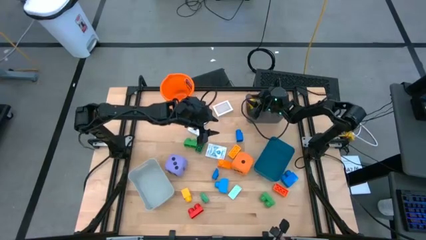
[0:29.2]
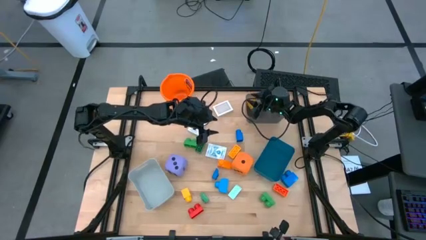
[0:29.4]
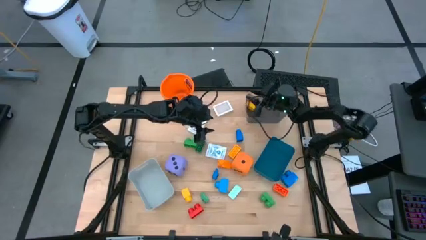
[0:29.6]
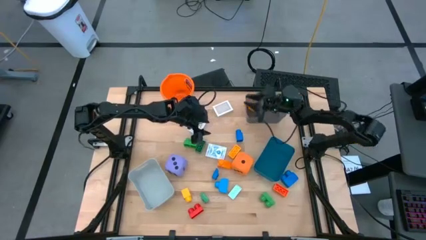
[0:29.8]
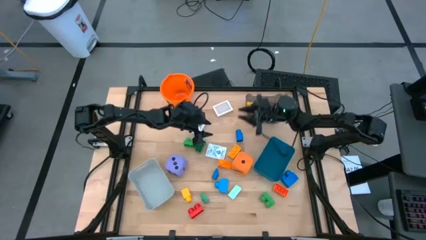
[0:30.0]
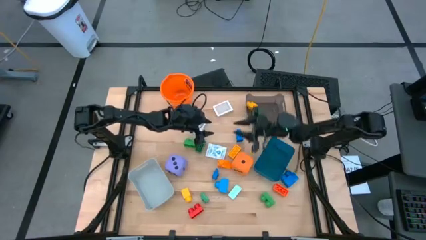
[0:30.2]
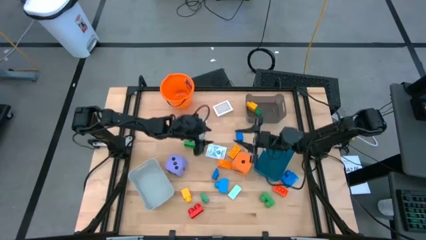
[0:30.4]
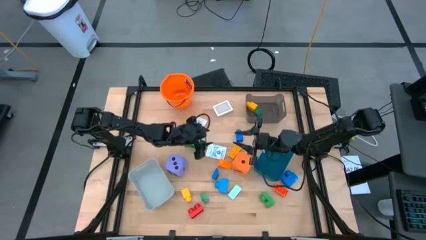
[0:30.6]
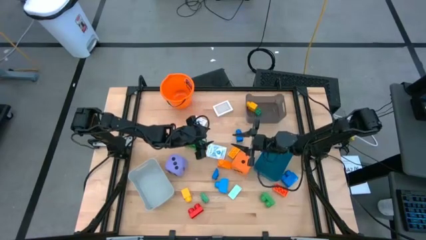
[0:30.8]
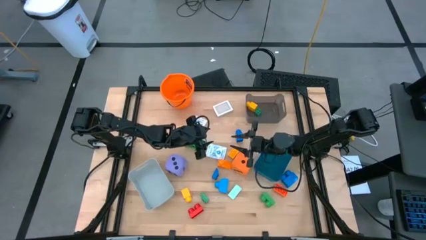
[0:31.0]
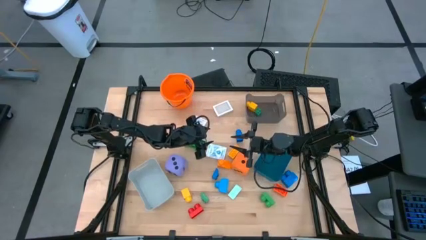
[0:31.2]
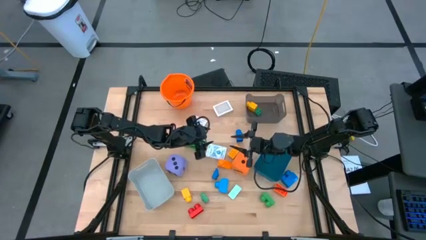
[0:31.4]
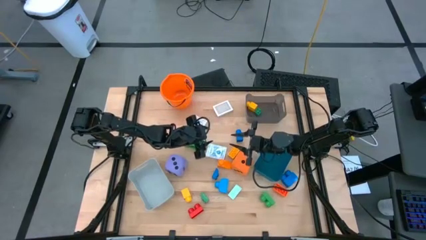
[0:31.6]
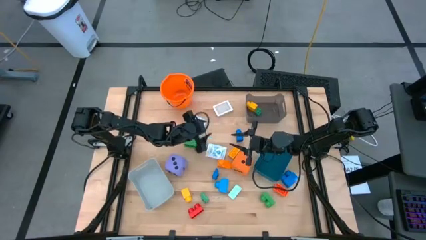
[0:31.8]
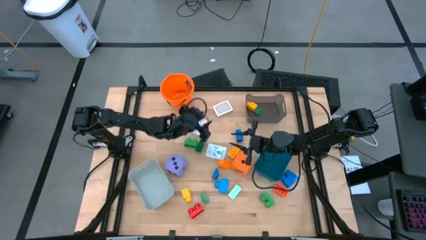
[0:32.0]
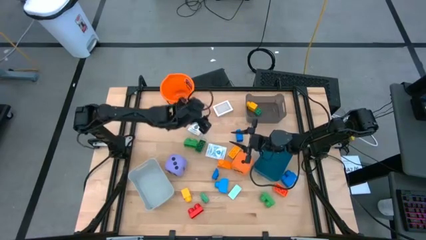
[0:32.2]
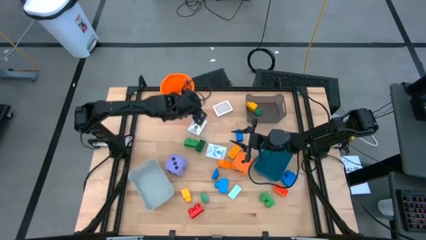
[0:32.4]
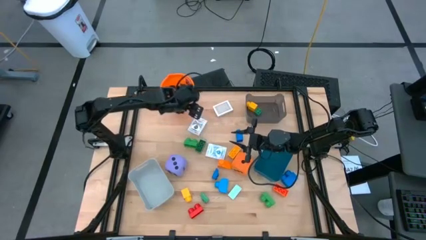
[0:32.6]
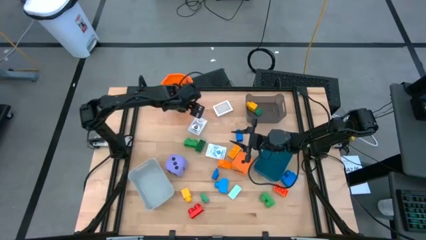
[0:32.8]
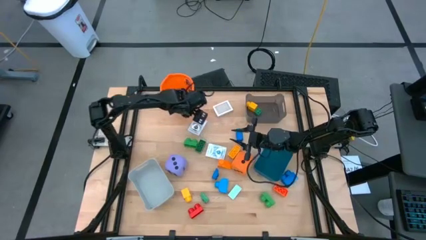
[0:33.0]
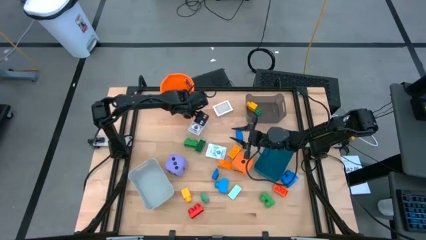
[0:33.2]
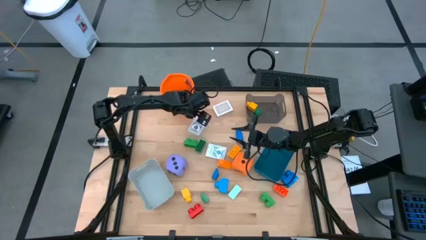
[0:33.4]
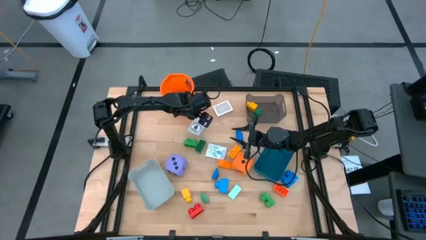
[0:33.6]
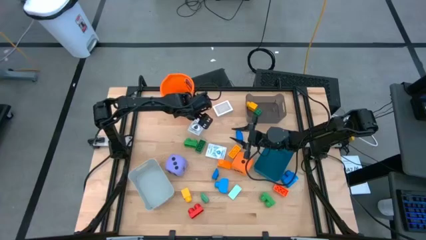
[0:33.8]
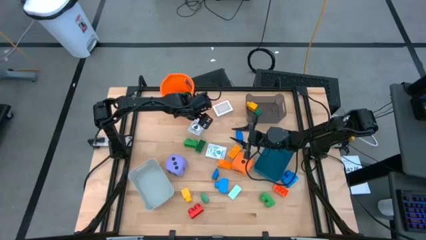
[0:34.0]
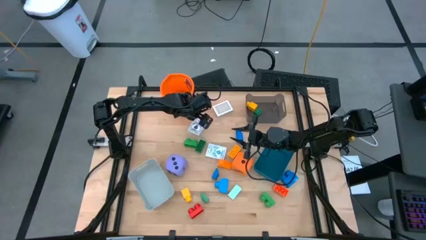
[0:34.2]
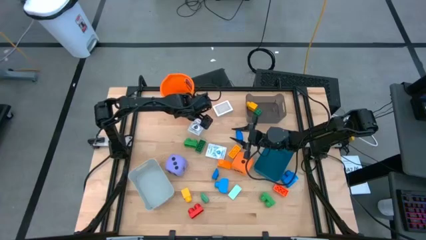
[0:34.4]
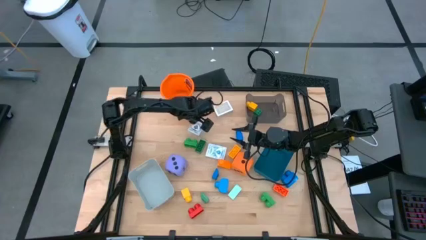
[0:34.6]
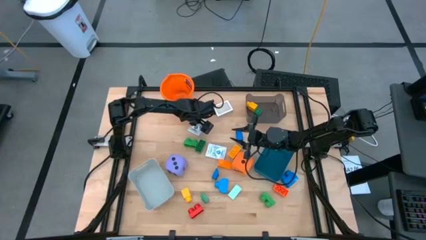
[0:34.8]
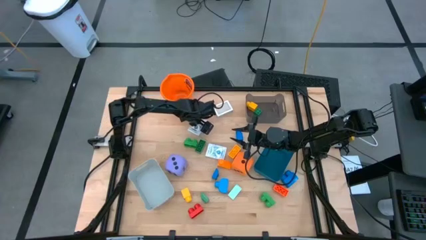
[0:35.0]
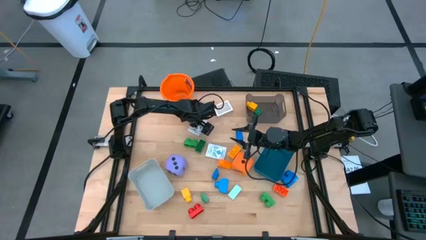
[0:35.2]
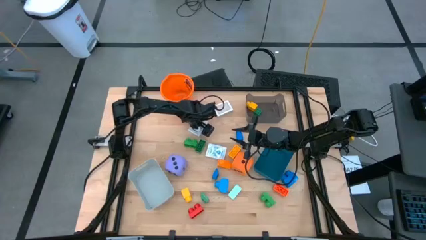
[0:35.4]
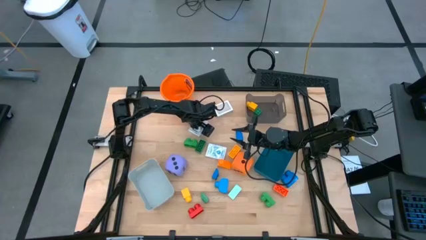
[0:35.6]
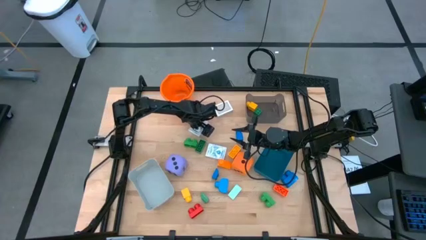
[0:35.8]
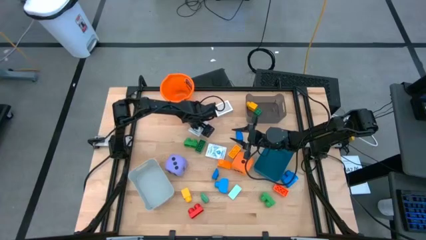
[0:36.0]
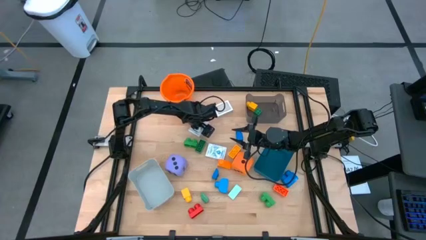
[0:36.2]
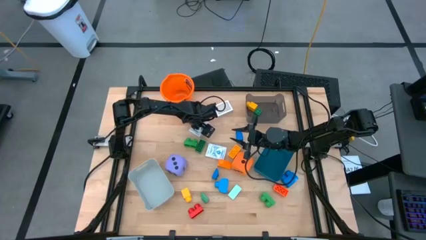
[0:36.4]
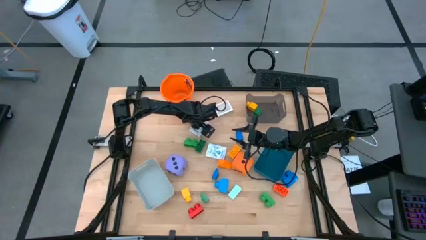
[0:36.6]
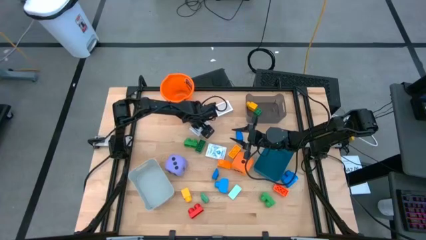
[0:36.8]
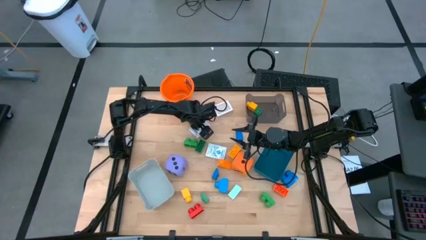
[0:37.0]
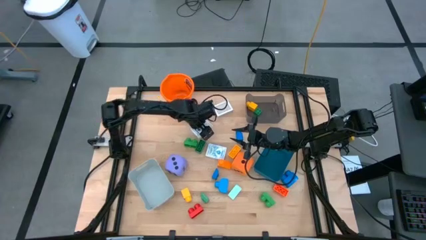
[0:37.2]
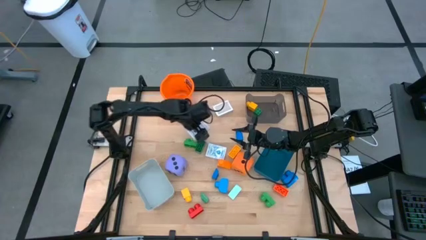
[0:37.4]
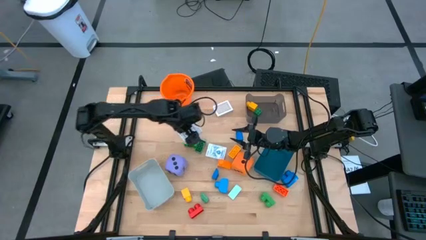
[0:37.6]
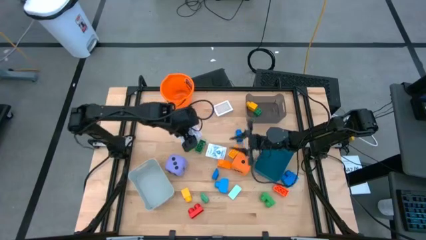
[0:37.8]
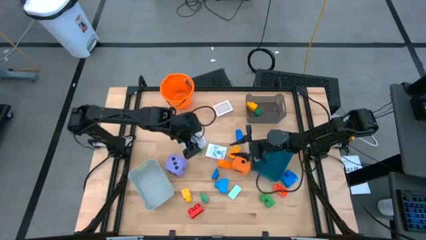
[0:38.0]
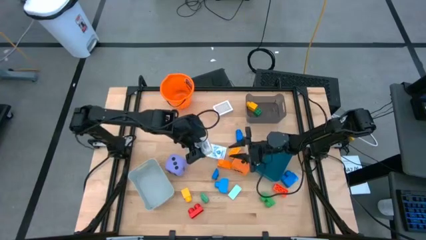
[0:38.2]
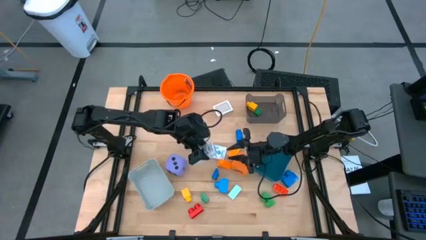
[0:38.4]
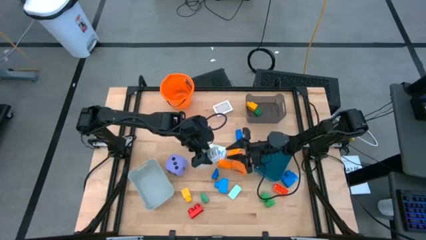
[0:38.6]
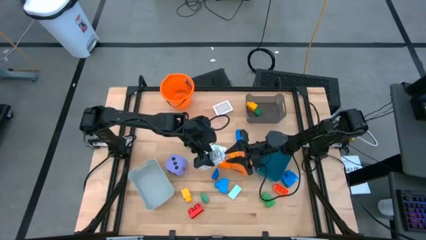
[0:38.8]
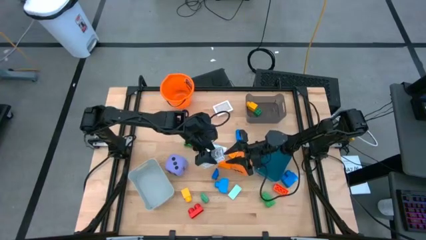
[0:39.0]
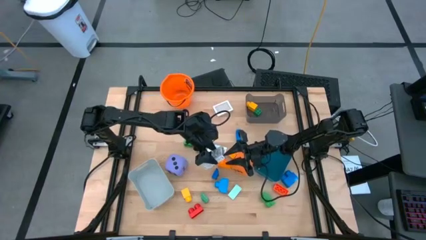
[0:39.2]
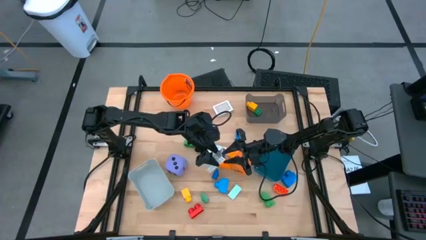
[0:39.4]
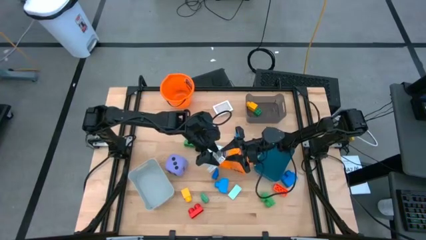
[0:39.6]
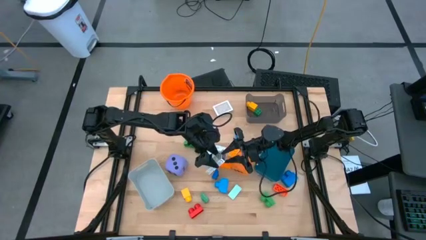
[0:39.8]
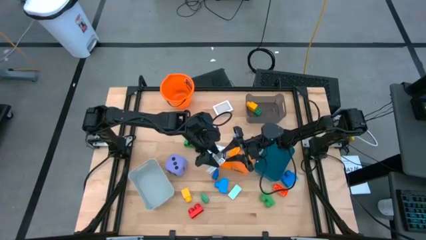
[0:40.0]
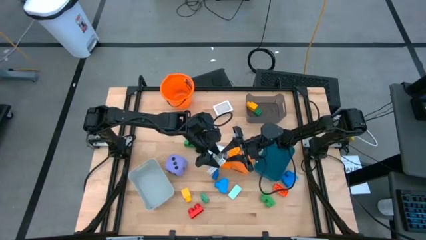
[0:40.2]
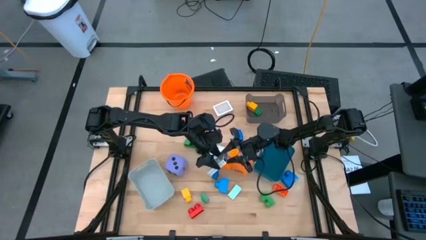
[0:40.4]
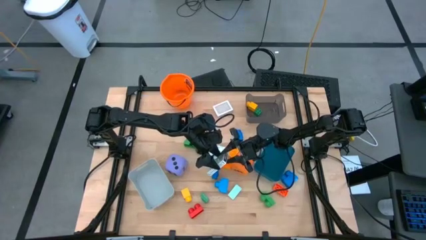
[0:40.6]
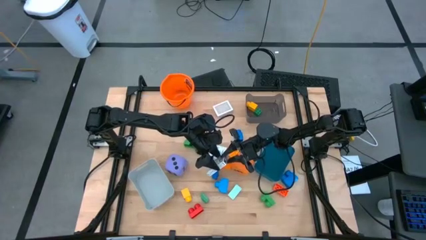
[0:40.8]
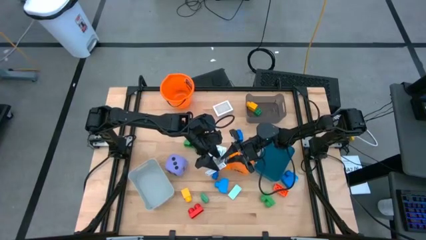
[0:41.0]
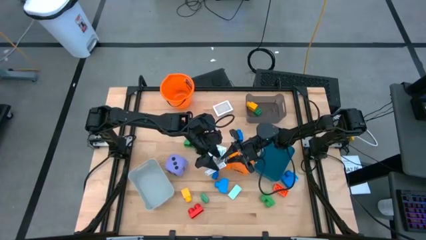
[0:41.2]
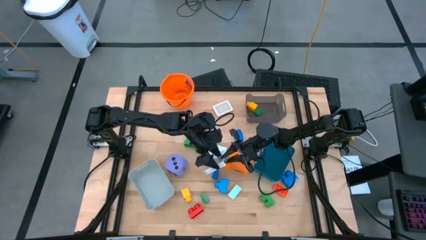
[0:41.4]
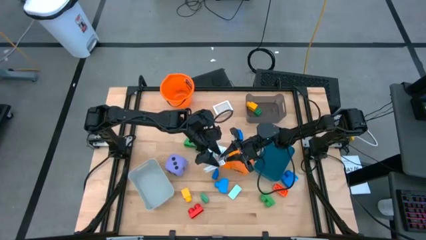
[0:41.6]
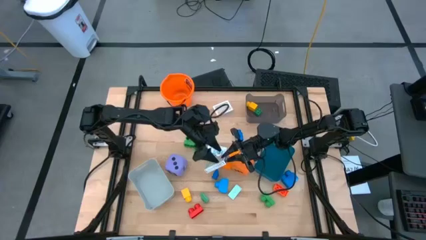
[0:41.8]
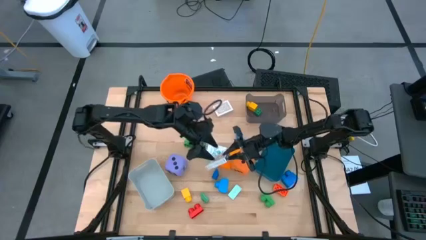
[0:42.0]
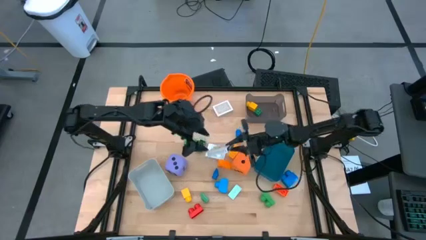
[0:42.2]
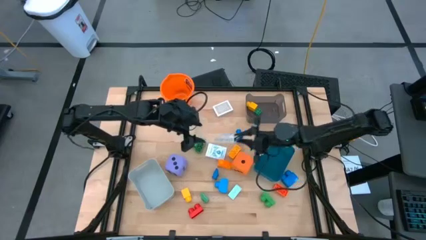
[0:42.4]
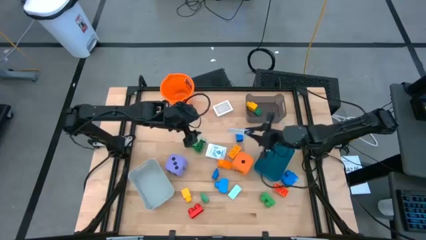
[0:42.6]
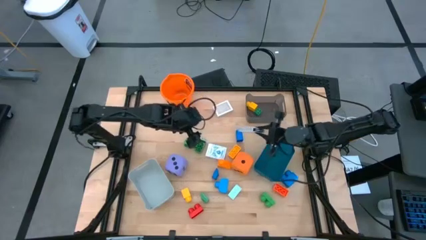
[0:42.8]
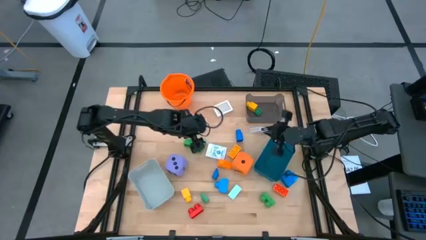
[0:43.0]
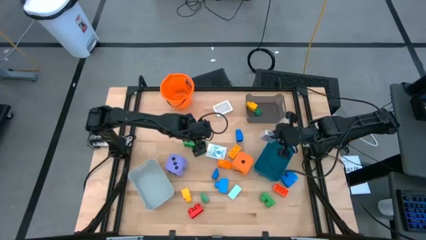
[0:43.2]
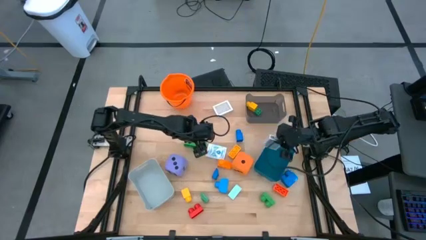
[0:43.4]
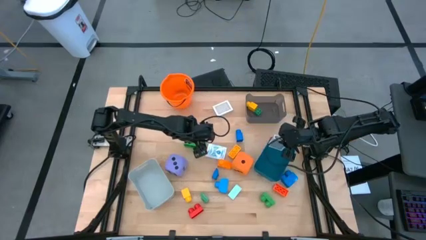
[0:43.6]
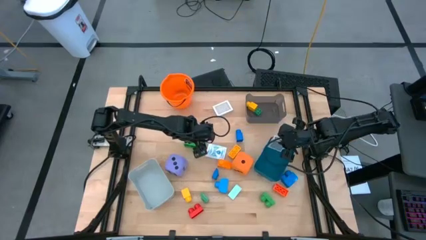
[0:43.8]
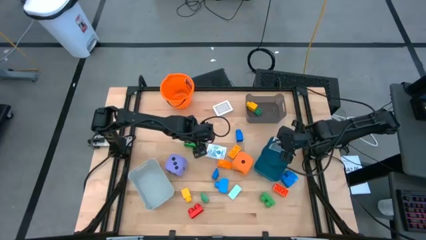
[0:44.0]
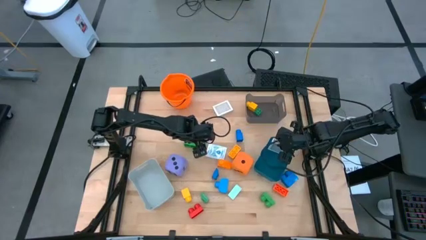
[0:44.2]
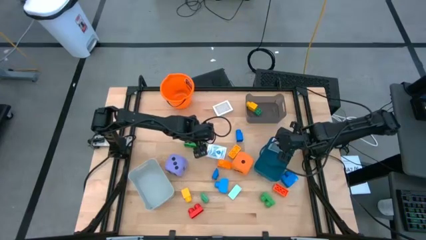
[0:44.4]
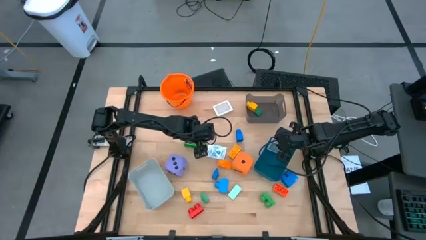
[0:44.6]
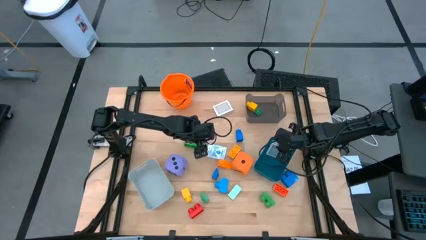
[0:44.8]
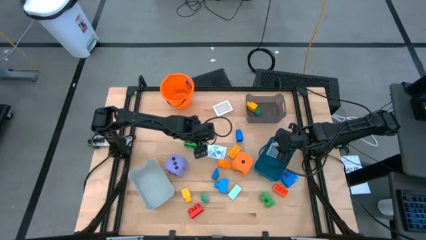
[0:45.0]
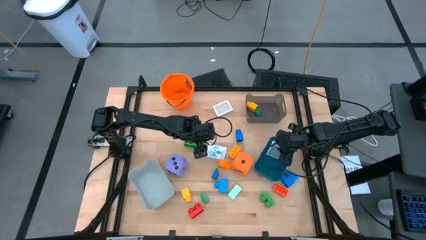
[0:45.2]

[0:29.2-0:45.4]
Task: Pick & Place Toys
Put the black deck of cards into the blue bin
